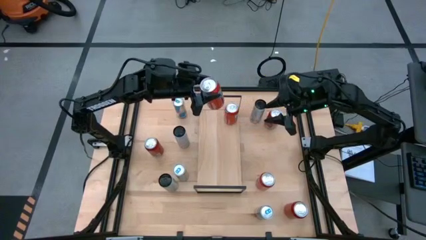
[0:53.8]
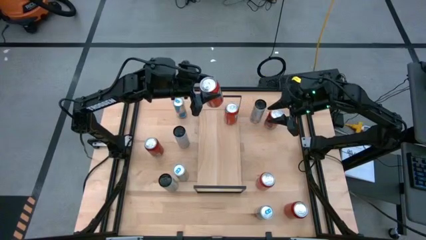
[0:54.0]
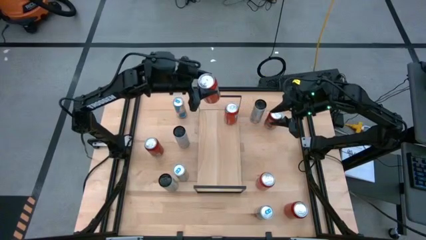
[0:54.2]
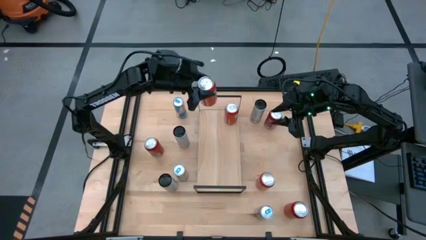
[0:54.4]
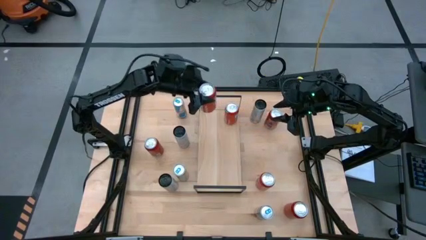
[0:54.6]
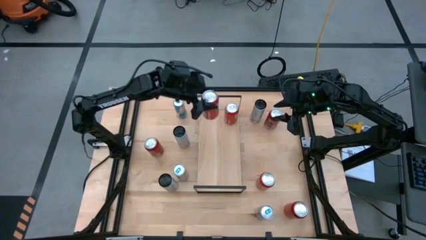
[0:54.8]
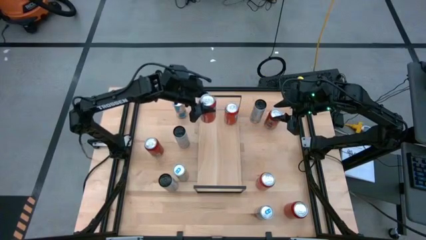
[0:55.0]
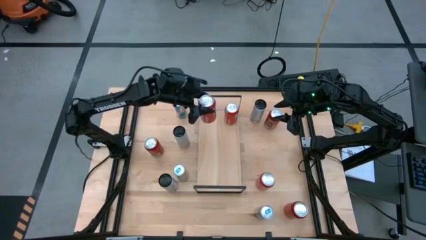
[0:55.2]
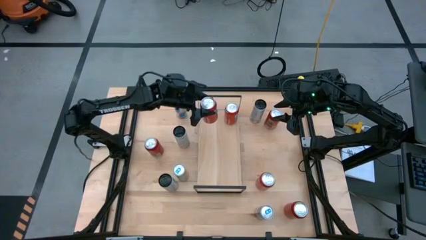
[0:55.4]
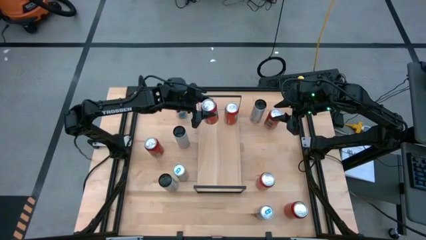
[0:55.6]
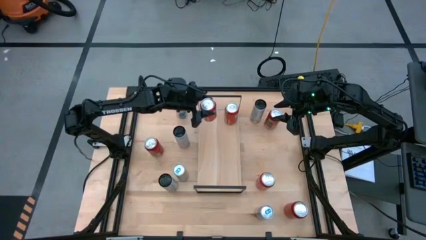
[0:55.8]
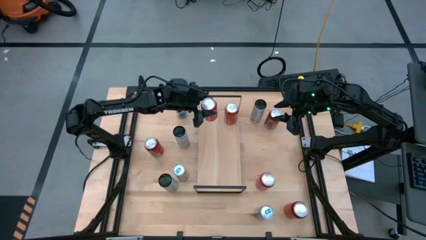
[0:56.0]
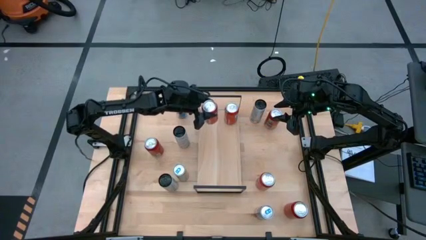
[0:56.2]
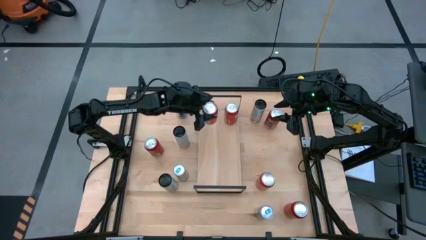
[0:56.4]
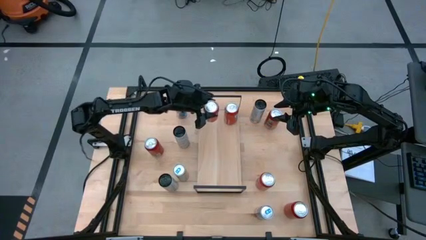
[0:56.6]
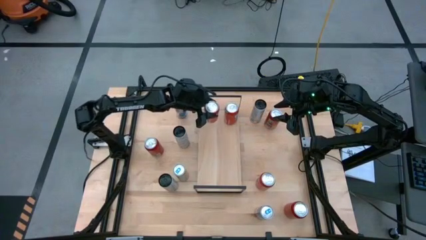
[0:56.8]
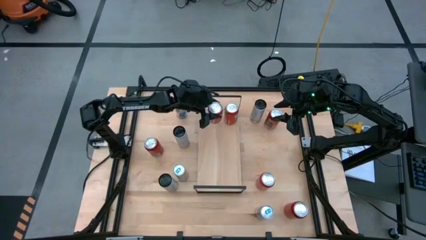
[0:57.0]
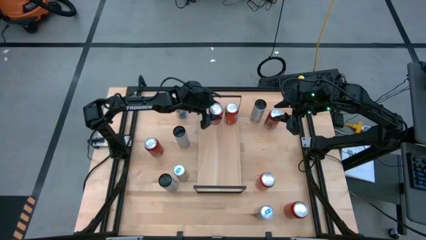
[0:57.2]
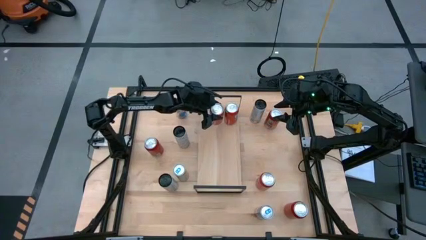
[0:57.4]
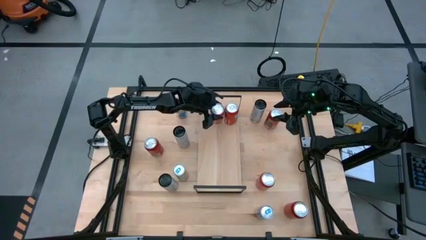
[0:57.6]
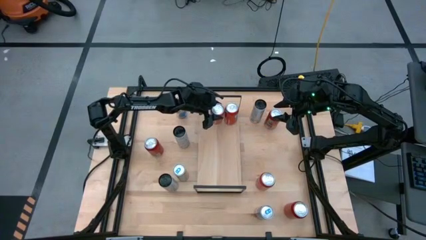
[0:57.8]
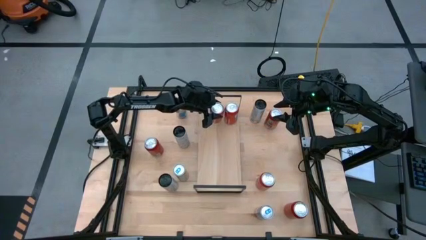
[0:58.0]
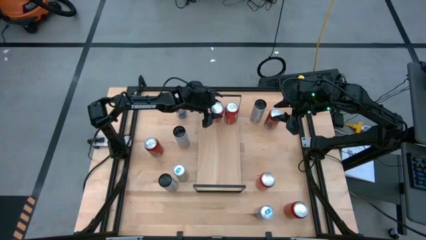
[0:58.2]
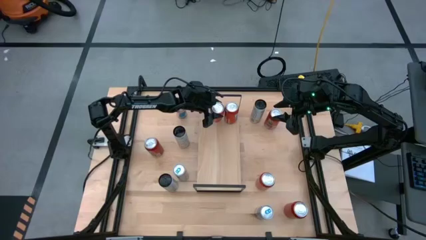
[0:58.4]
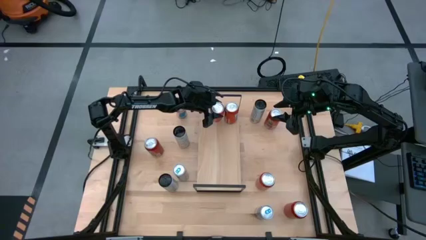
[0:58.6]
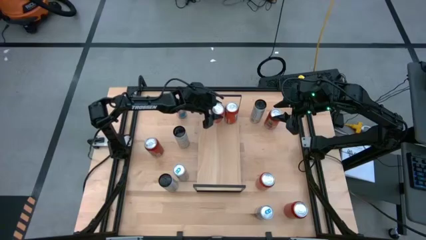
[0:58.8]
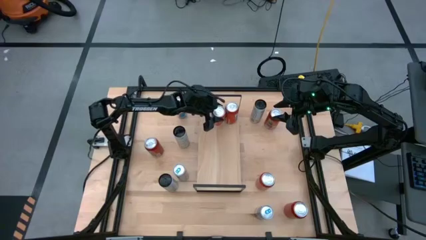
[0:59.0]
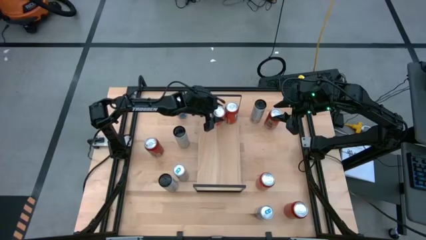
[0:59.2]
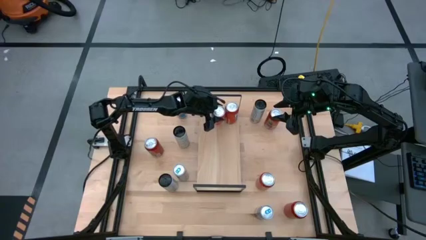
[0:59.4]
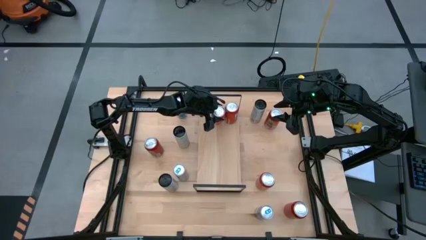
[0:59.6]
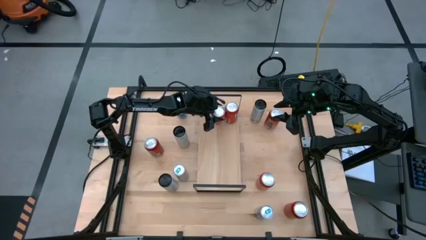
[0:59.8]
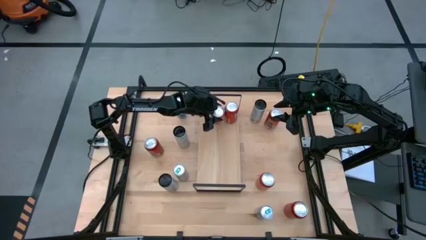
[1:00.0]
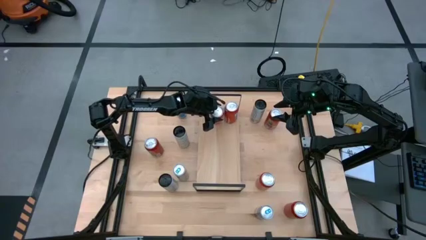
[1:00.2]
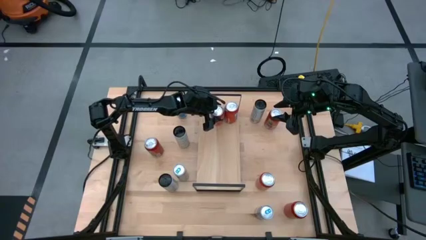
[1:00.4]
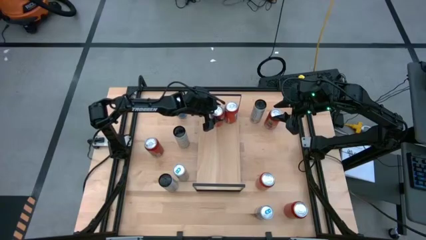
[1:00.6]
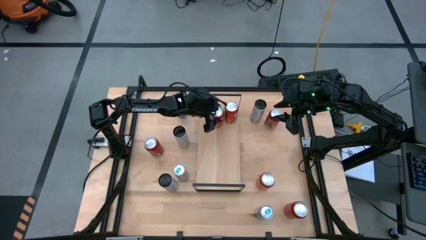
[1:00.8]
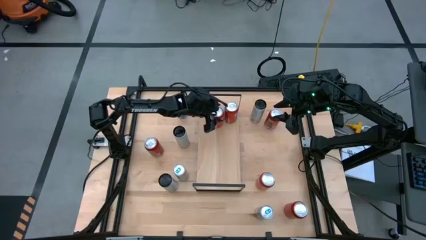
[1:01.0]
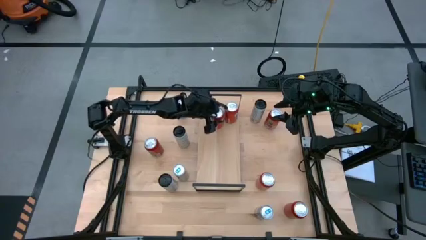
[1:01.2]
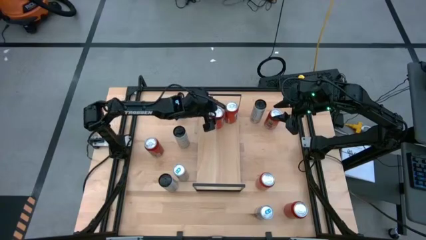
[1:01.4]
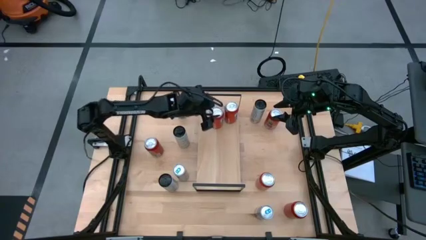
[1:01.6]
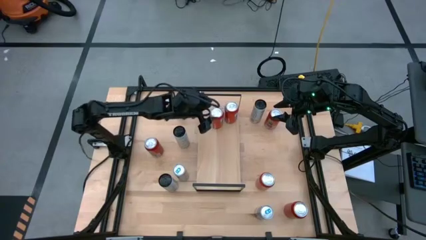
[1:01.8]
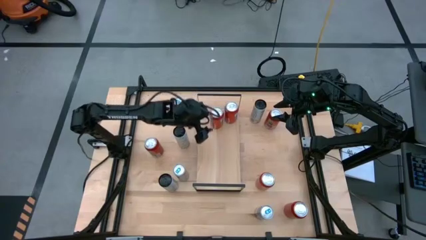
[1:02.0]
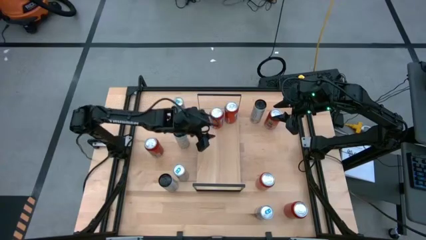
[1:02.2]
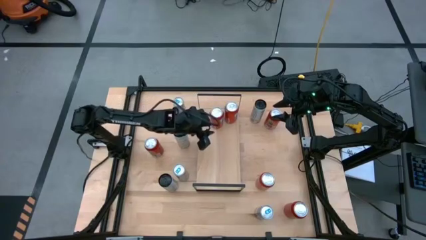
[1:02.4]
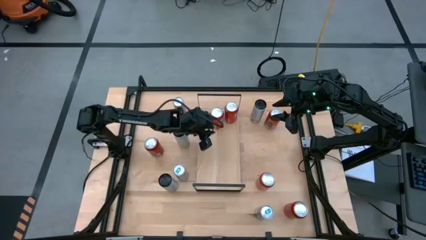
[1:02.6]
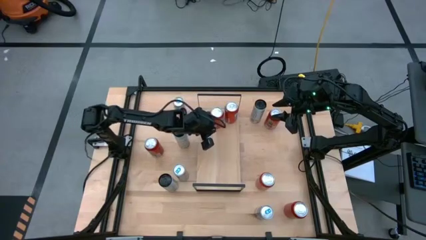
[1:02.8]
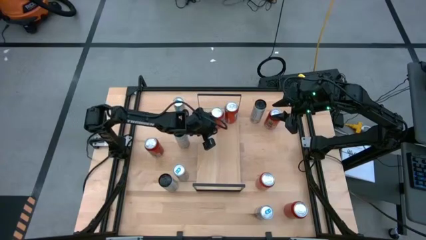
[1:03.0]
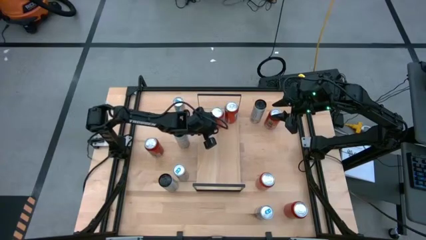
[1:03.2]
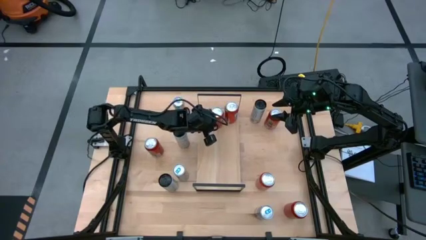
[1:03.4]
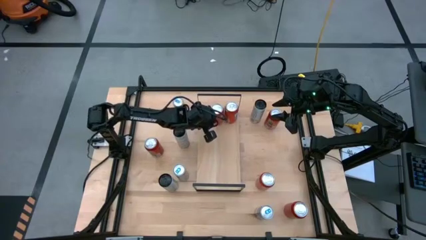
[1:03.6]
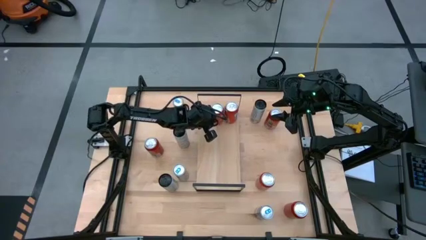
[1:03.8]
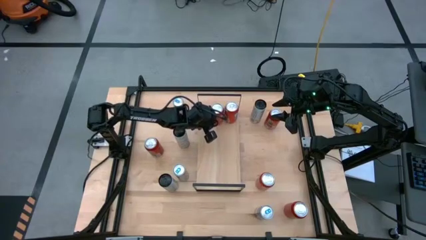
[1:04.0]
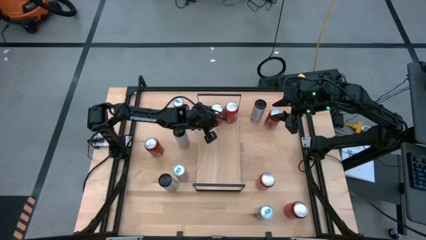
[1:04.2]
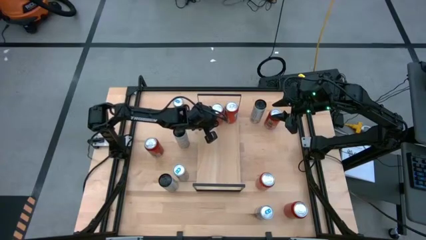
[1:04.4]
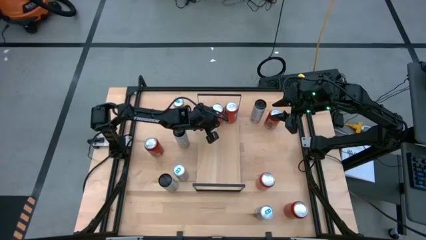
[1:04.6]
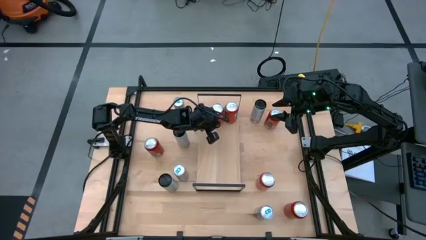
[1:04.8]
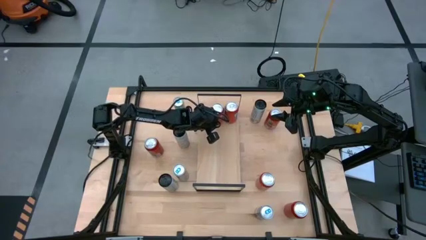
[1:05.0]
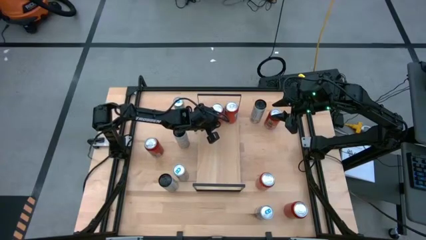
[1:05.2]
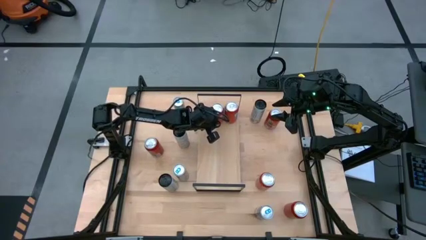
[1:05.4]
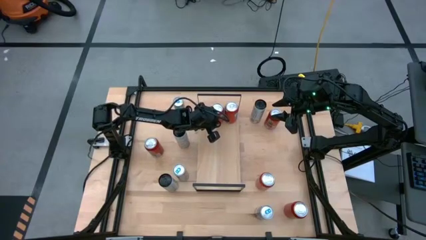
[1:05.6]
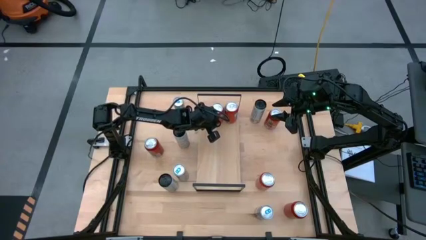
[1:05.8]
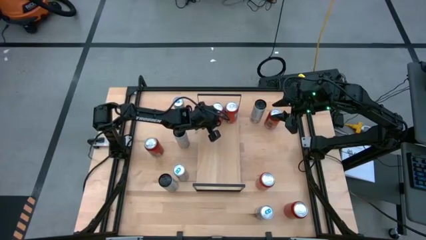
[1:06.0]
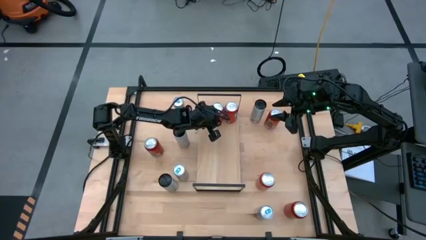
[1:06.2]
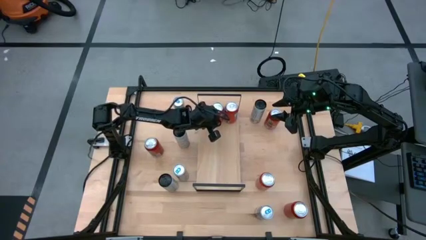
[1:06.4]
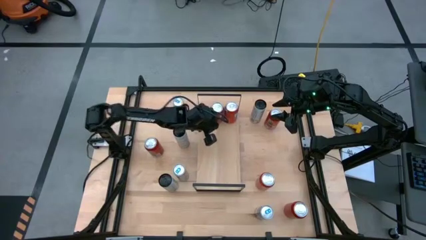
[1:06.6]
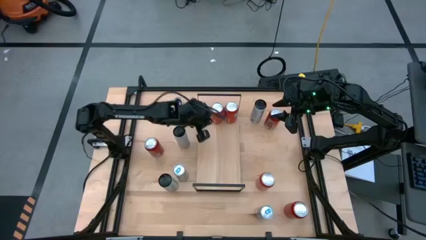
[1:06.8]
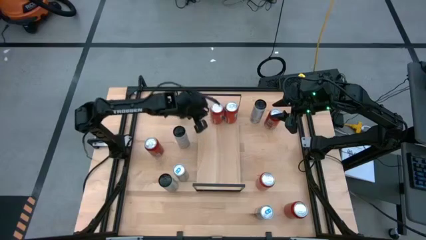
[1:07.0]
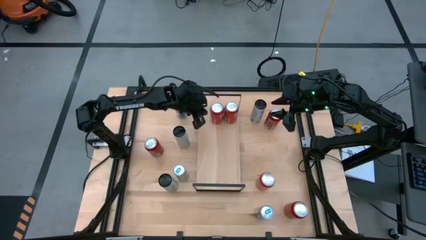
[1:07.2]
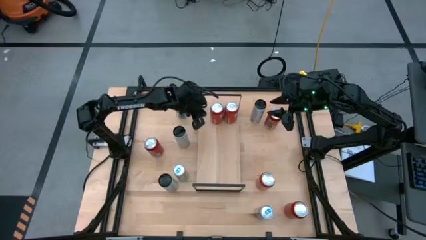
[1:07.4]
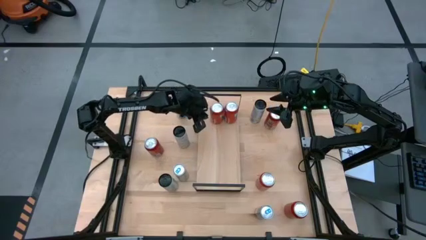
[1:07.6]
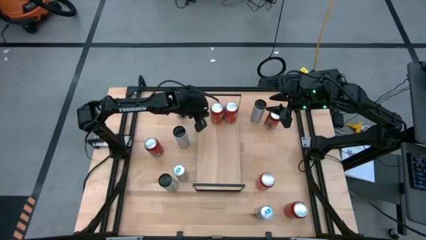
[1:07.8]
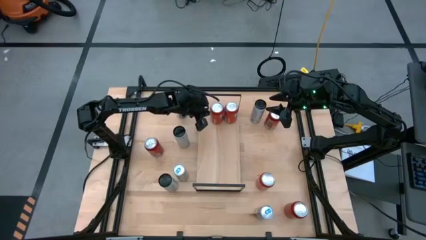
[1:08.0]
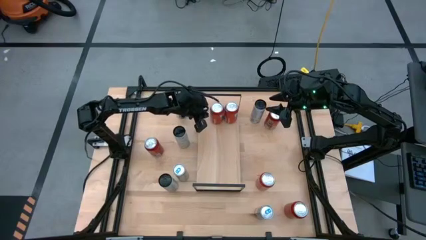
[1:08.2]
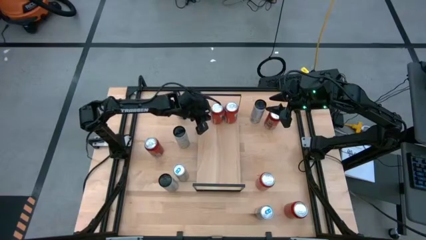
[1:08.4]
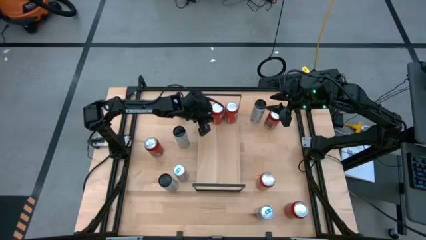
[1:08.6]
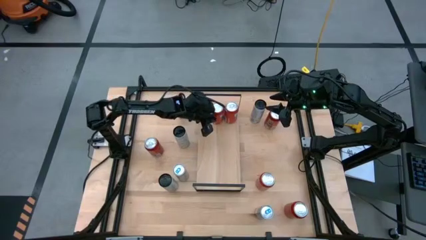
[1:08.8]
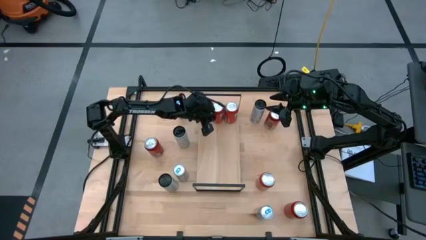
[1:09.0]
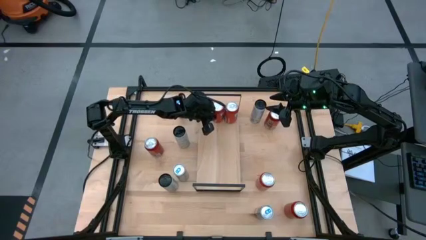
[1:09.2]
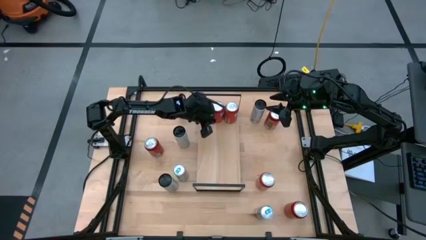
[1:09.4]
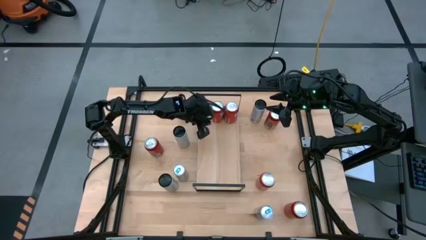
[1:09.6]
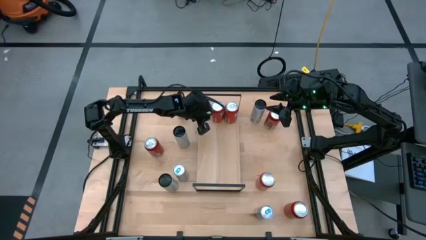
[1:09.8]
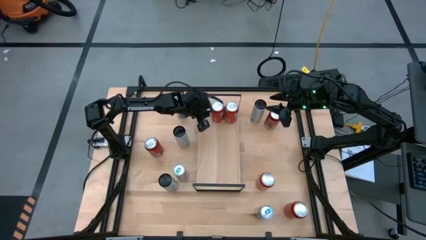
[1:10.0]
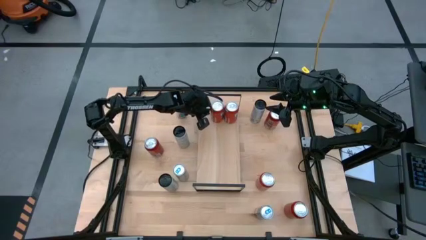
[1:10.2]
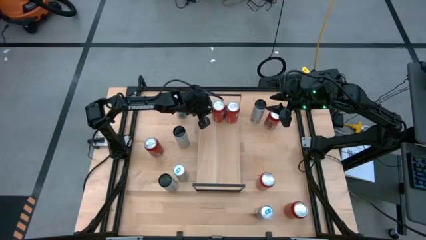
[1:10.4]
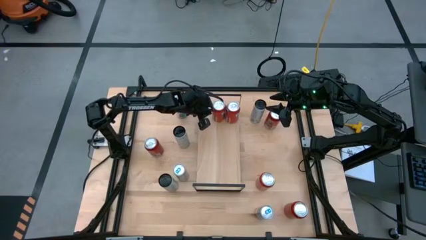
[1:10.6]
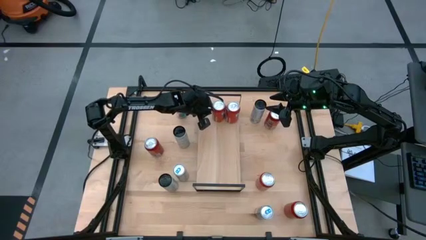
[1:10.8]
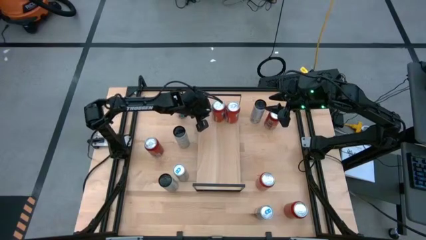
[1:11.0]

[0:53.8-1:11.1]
Task: Place canned beverage on shelf
Put the left orange soda can on the shelf aligned with the other orange soda can

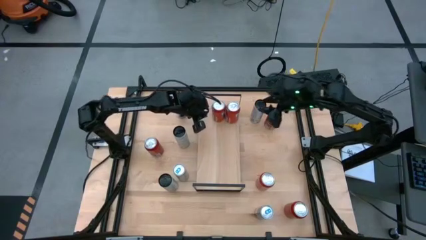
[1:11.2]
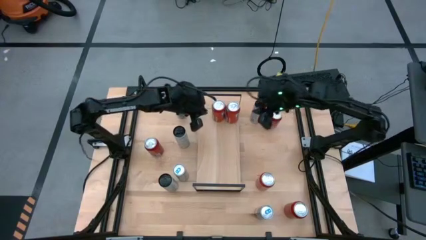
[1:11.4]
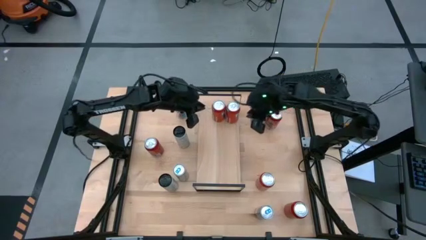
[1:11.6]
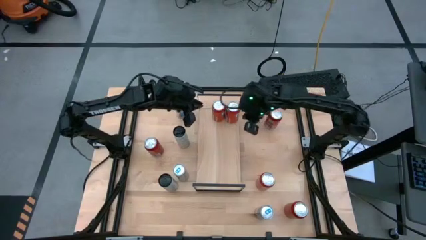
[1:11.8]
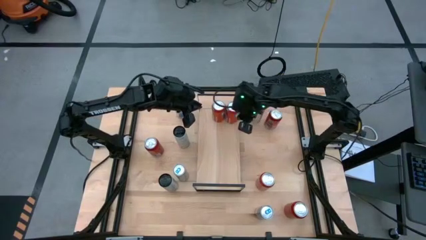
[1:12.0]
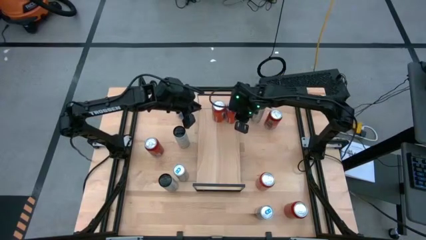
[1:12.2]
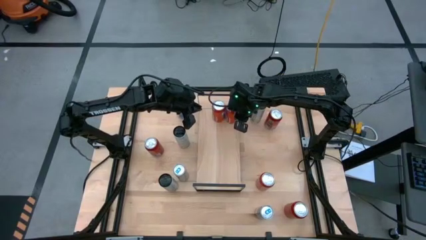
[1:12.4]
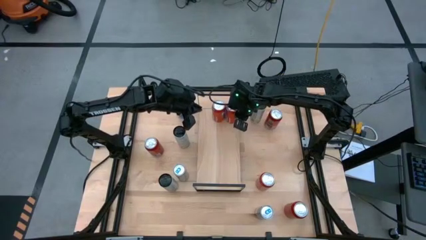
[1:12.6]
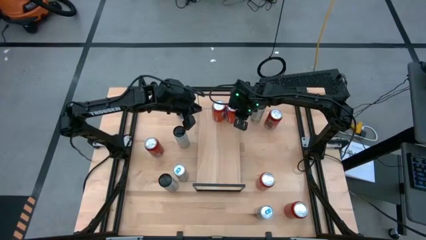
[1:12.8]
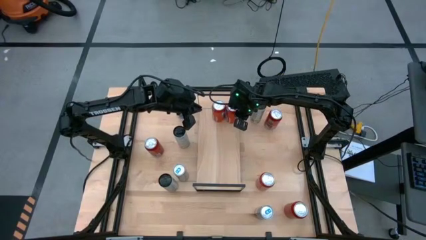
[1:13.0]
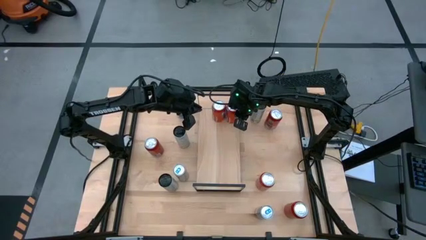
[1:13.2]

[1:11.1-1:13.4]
Adjust the orange can on the shelf
